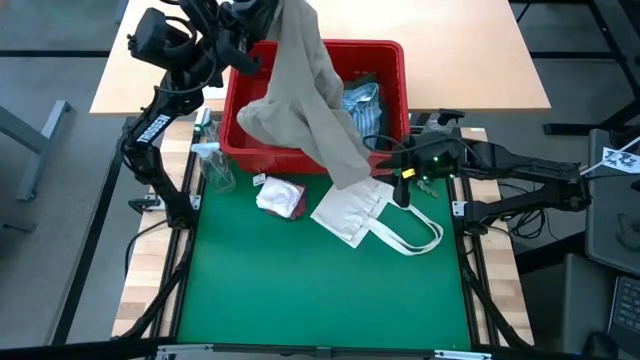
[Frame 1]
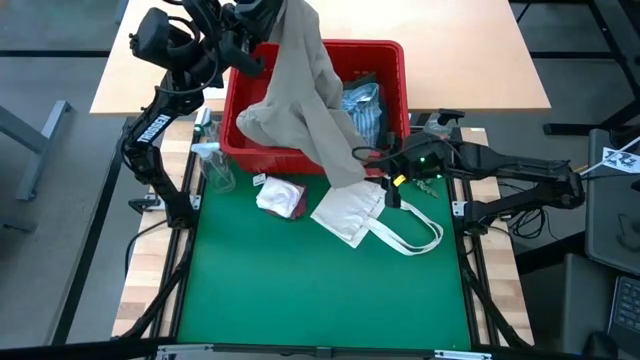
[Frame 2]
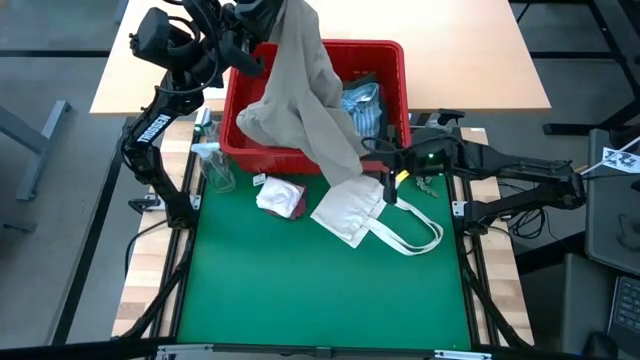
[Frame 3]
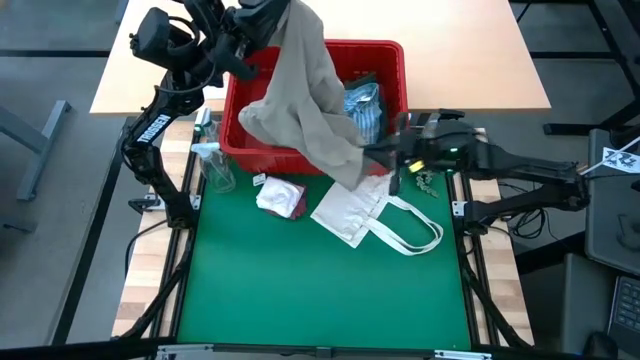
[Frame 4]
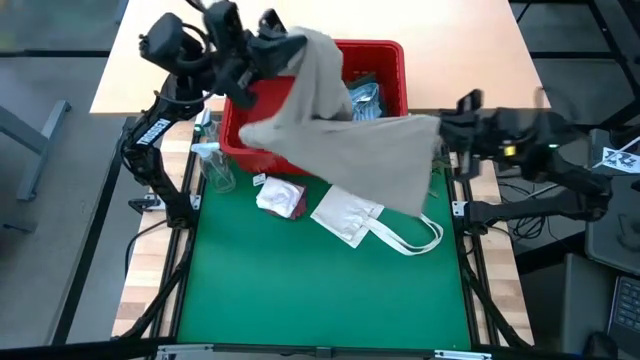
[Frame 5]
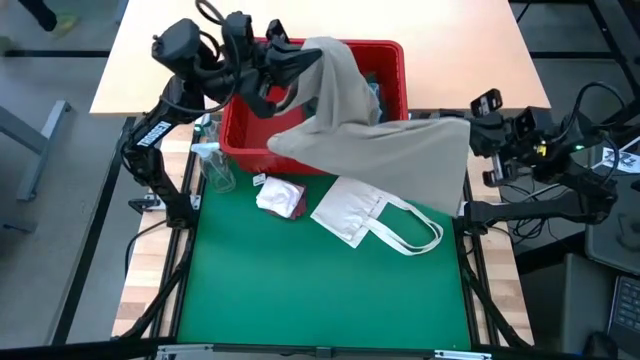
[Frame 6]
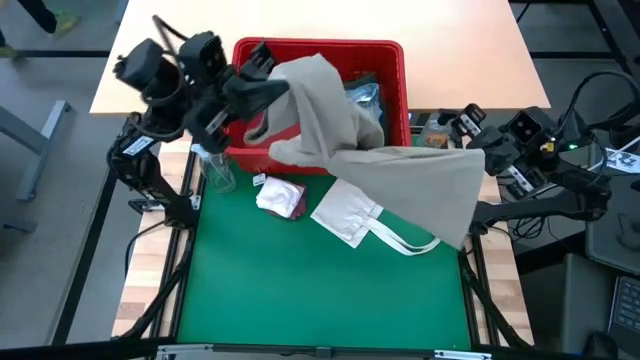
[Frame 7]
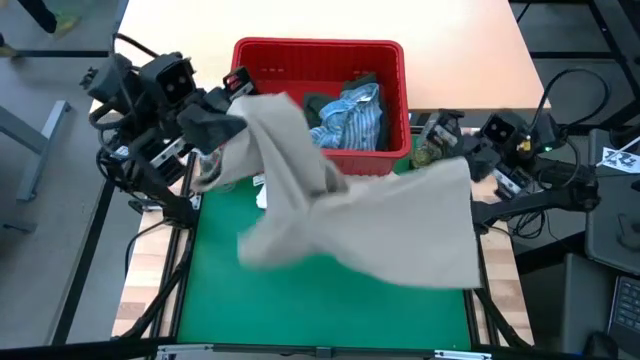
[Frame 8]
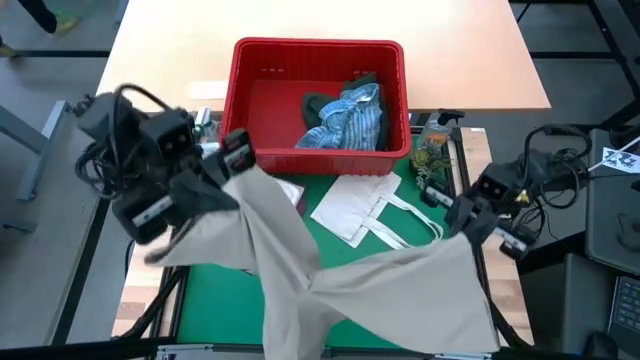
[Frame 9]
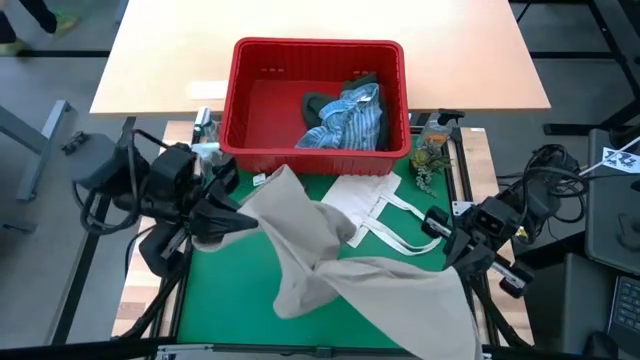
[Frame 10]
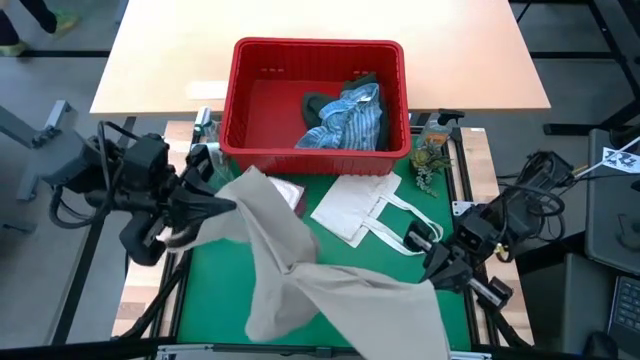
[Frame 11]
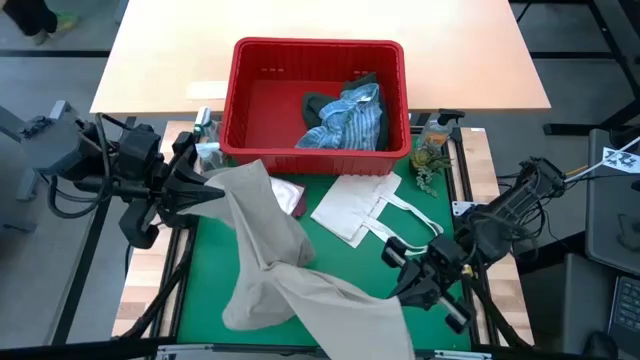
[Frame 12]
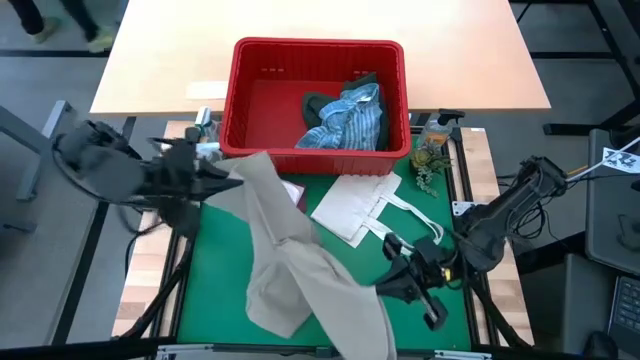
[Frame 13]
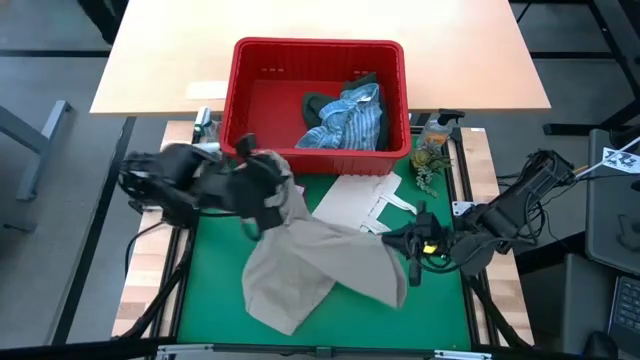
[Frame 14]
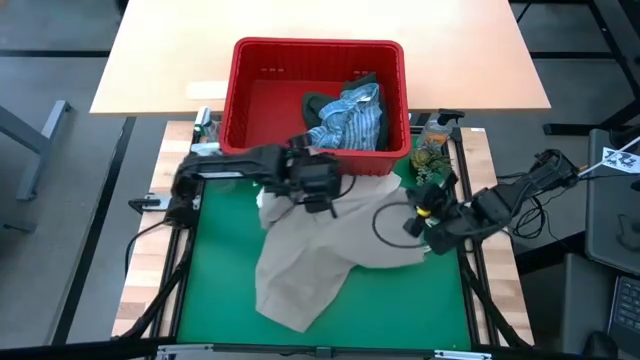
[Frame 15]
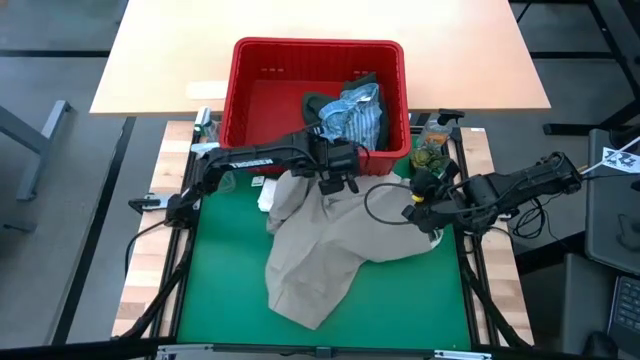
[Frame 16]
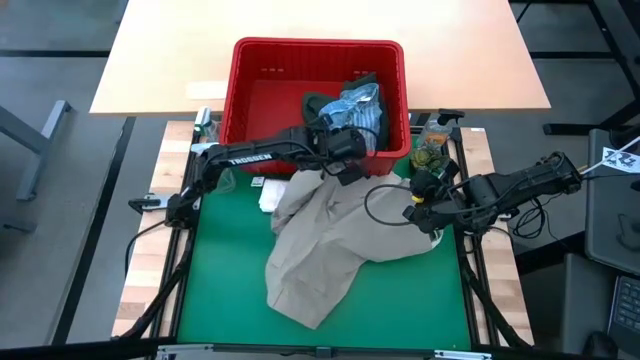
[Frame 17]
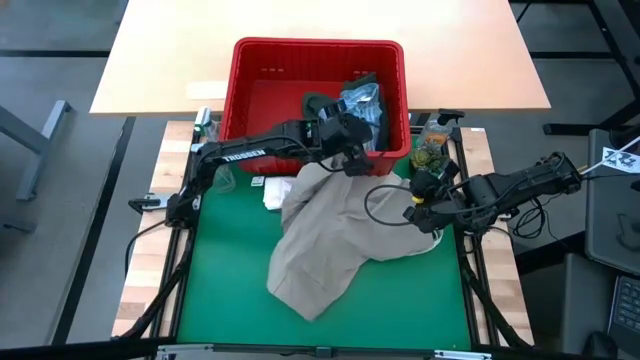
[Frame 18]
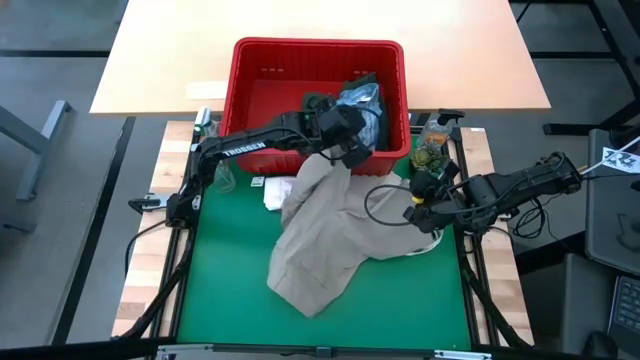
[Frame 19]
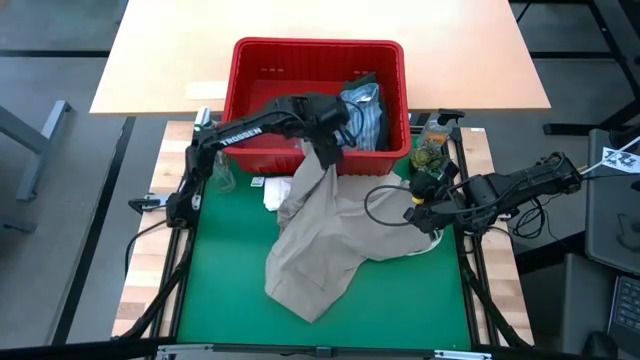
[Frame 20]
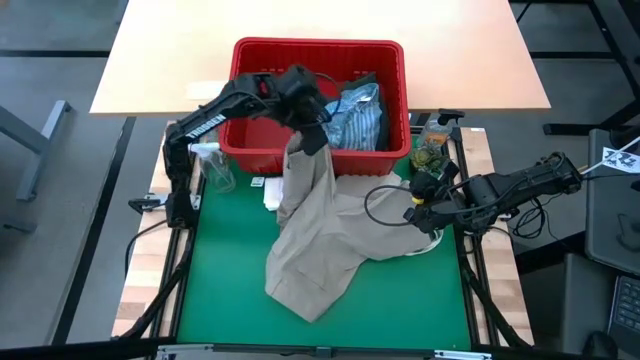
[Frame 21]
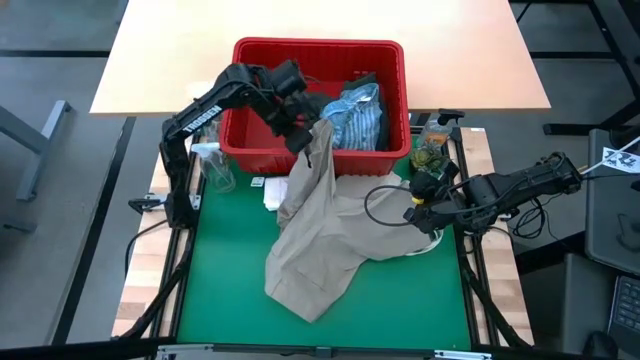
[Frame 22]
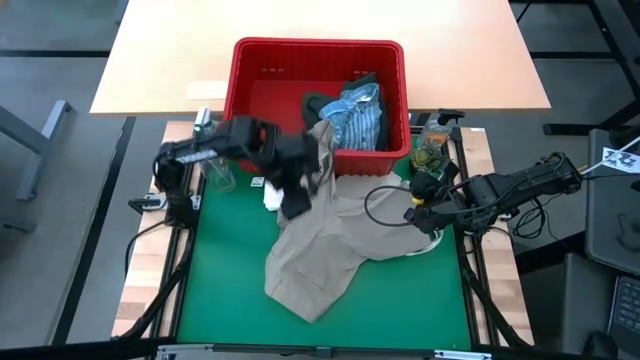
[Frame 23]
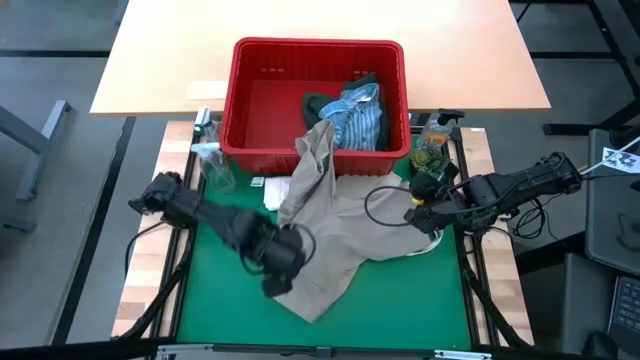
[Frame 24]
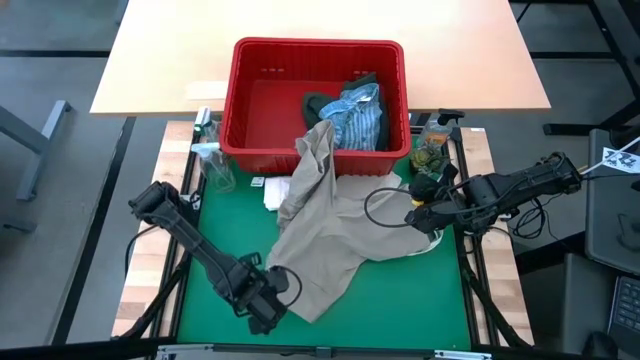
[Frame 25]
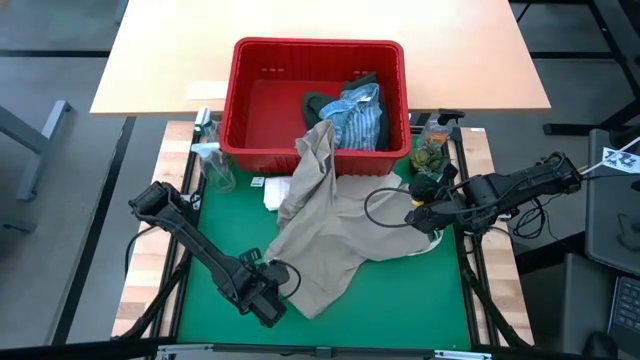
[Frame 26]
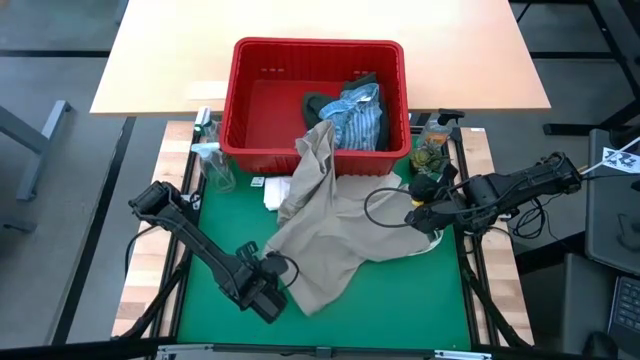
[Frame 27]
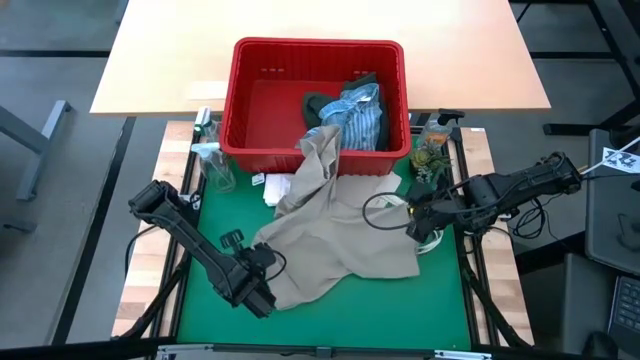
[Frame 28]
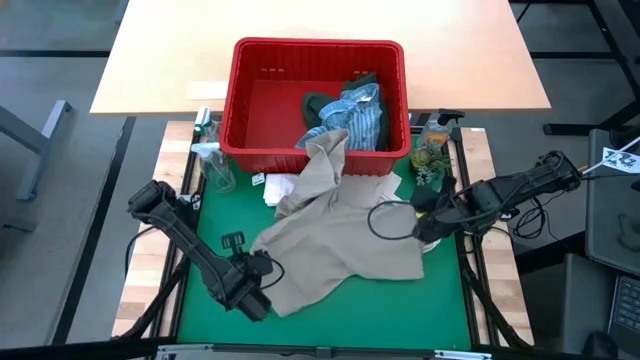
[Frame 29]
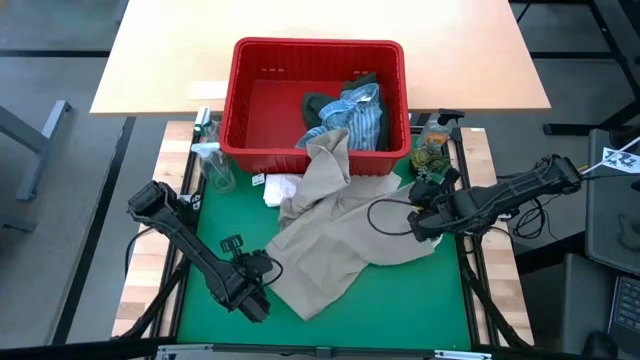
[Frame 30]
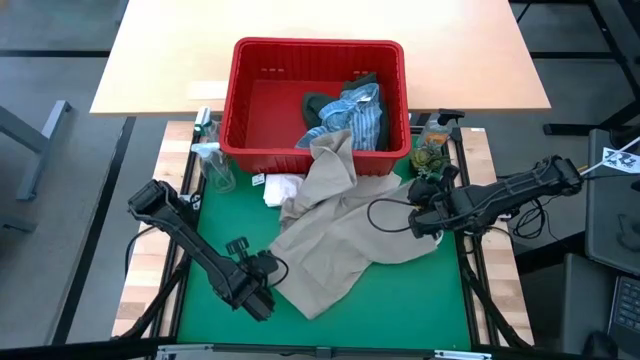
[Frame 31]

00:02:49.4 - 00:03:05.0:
Task: Fold Laundry from Bin
Remove the gray shorts from the red bin
